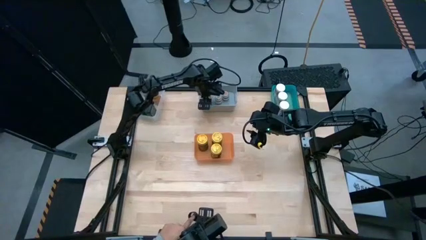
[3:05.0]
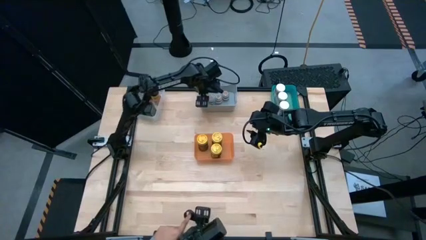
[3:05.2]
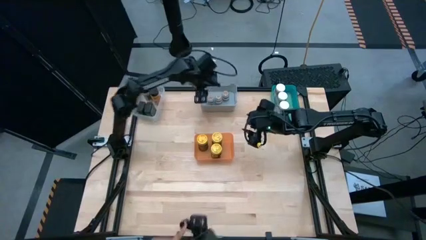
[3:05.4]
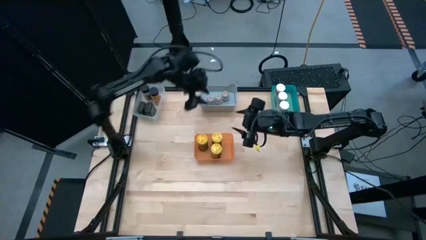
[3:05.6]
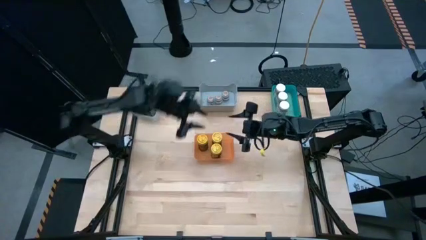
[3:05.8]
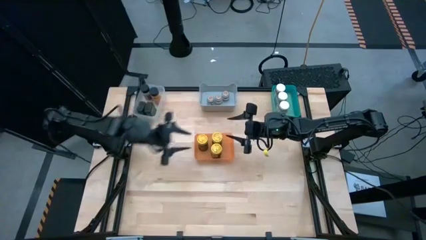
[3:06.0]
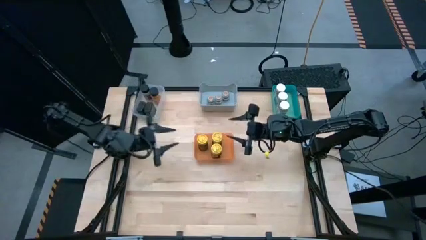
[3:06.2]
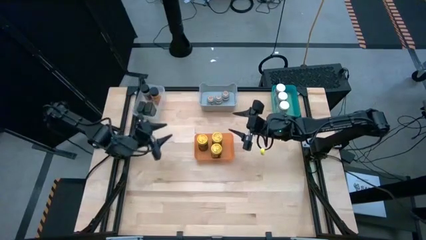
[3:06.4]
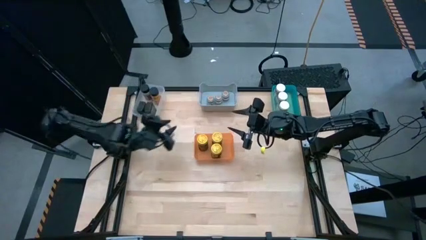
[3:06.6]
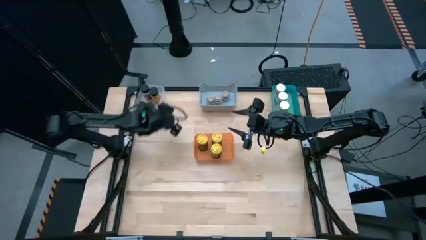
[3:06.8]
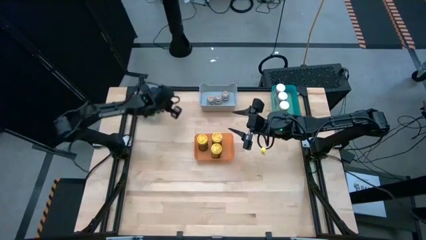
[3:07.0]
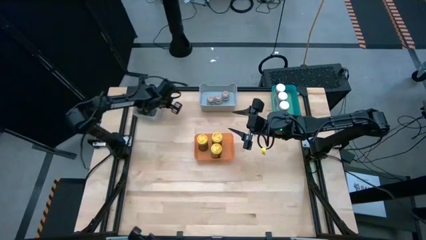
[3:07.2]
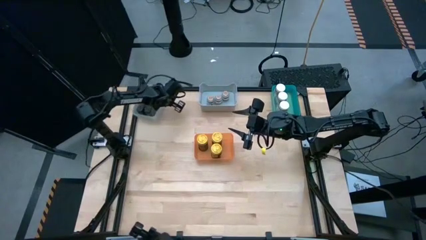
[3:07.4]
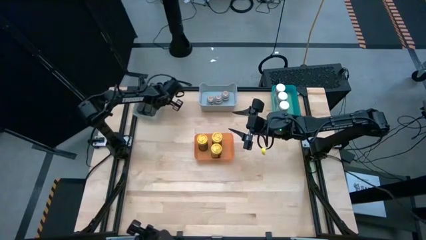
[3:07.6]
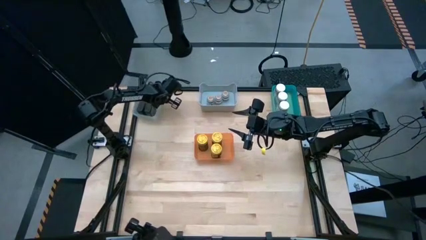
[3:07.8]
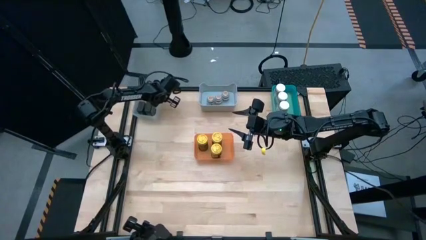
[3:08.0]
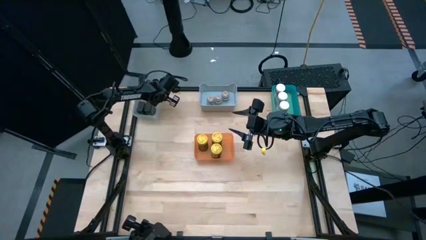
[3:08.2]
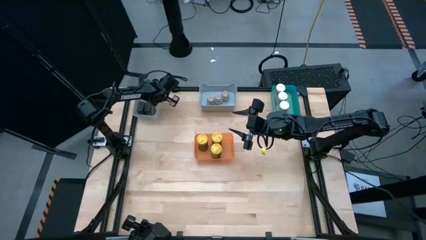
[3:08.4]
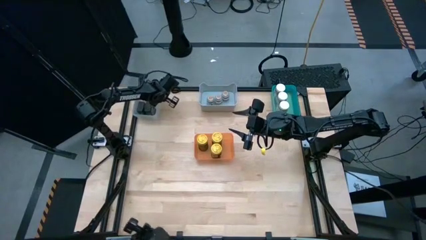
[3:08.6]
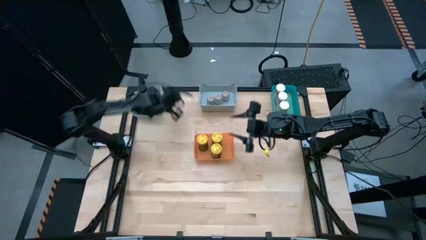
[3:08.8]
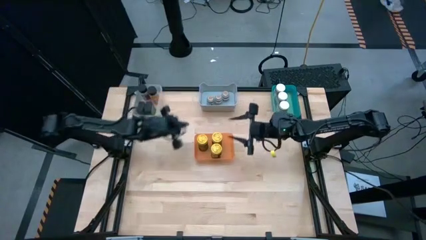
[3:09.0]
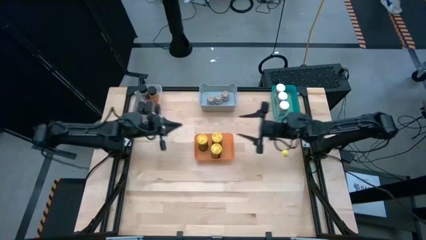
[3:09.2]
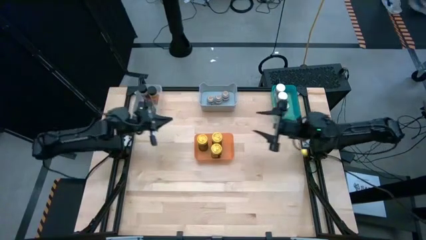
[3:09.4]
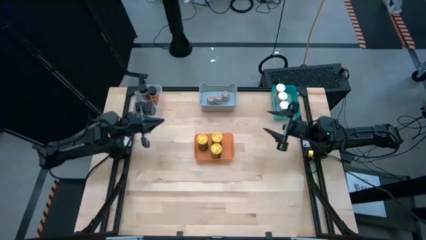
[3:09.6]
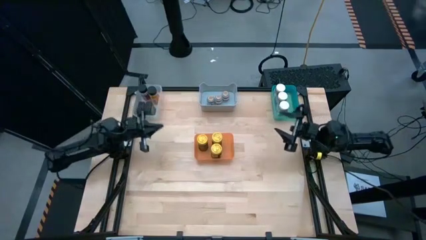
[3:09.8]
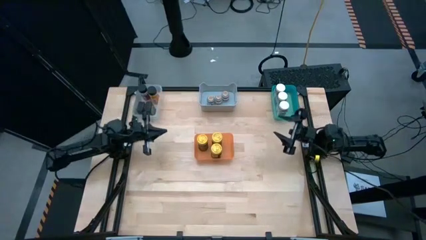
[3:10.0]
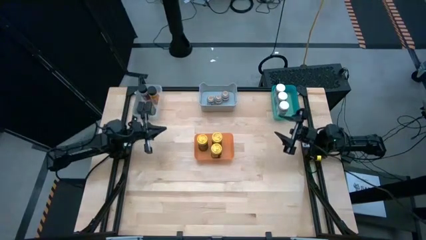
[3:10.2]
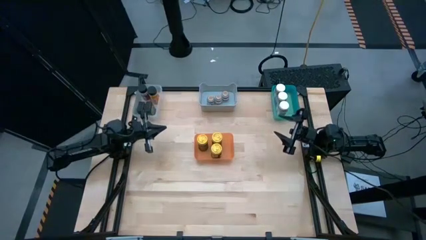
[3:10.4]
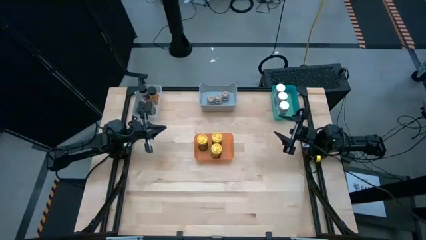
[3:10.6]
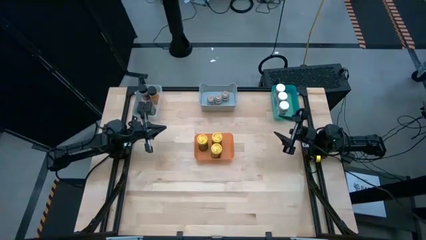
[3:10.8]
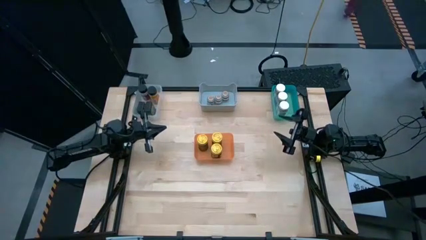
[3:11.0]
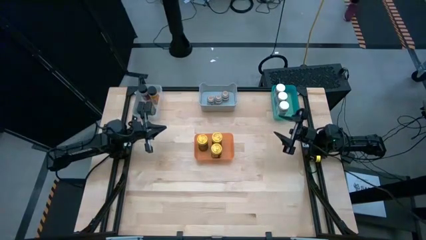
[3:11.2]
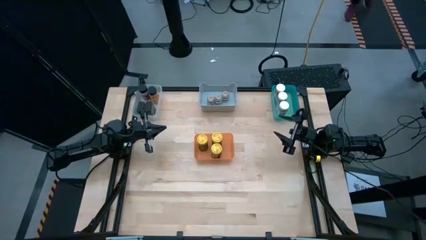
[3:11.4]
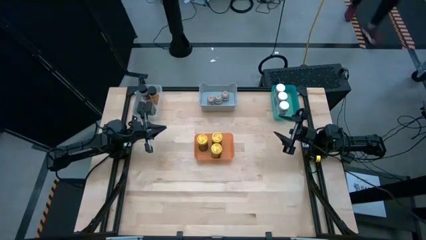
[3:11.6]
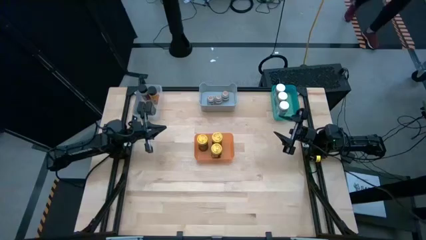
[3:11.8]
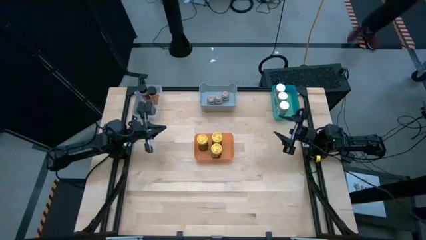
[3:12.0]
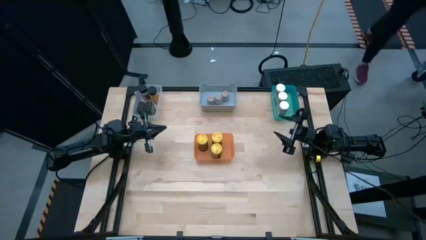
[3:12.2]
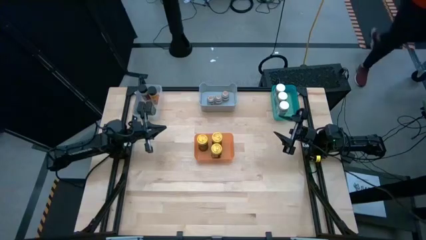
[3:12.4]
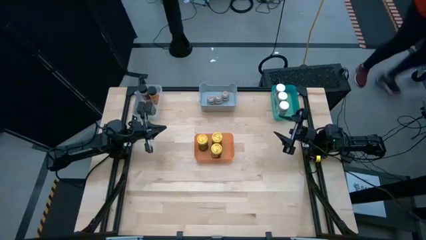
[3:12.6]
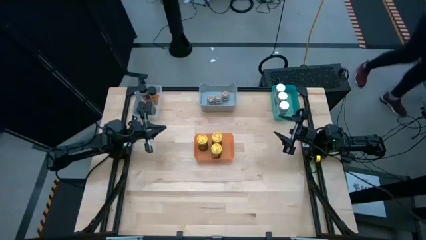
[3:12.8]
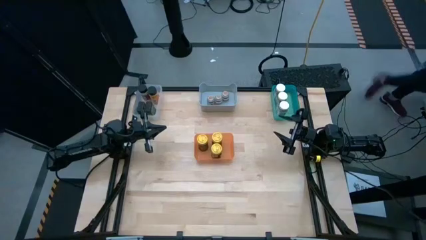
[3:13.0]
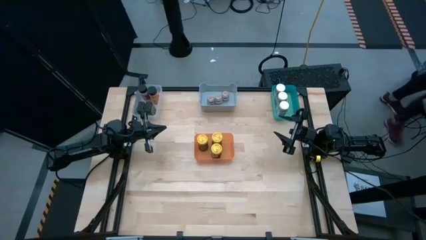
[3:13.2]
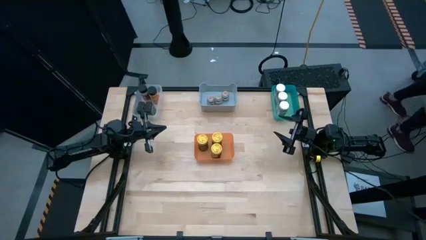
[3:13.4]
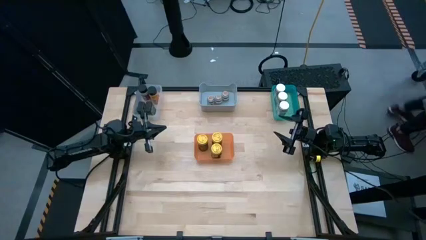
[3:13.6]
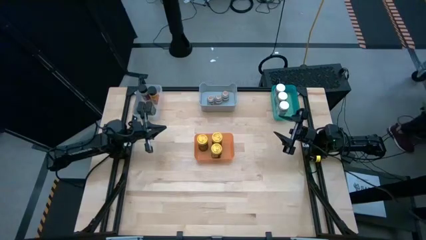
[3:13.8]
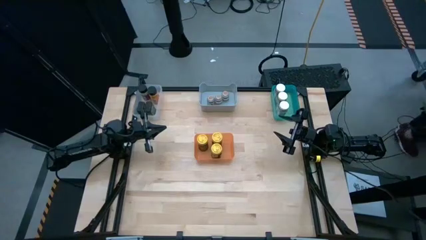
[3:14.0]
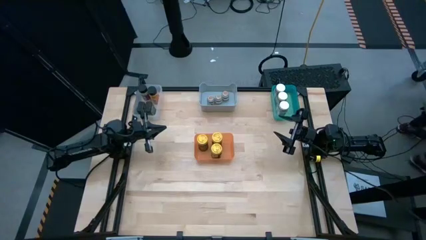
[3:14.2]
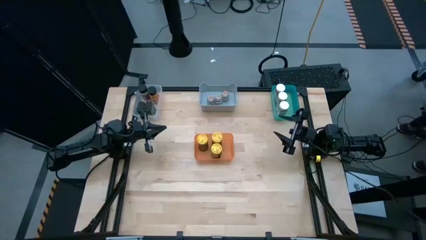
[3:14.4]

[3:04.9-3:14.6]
Task: Sort spices by type
Return to Home Position

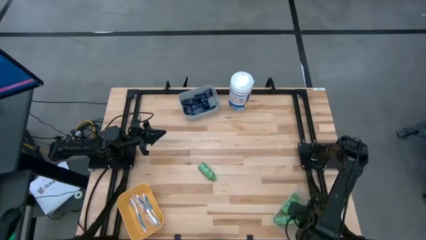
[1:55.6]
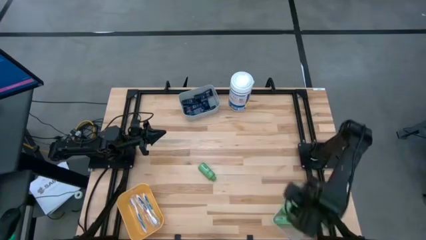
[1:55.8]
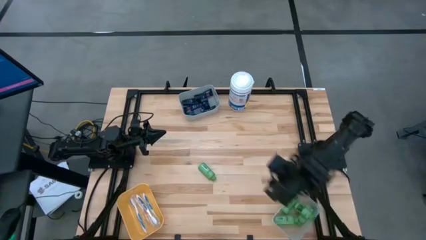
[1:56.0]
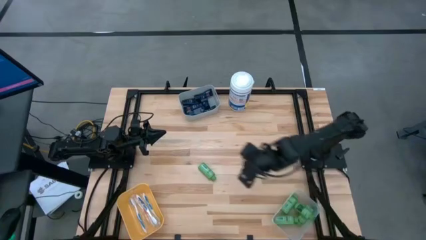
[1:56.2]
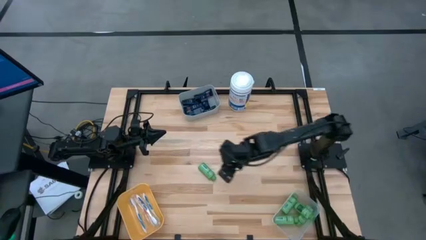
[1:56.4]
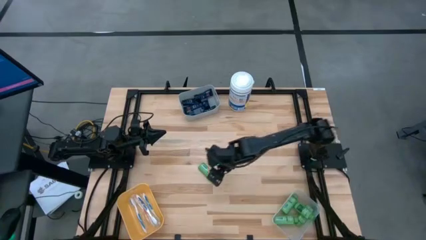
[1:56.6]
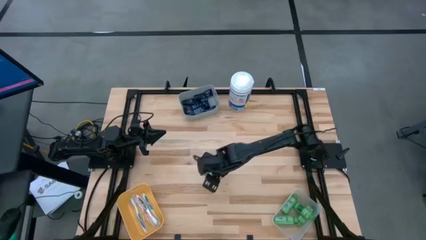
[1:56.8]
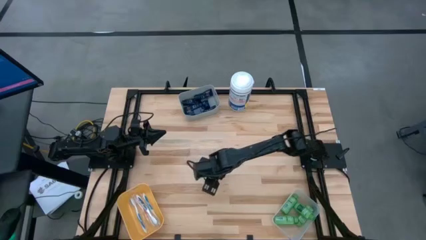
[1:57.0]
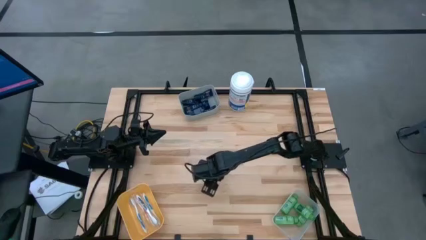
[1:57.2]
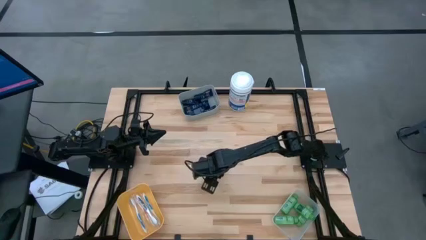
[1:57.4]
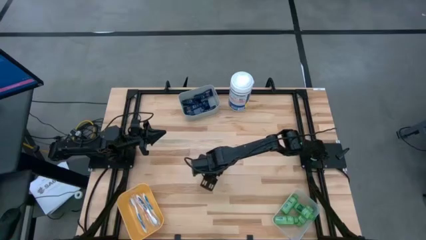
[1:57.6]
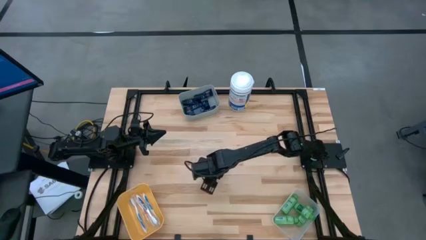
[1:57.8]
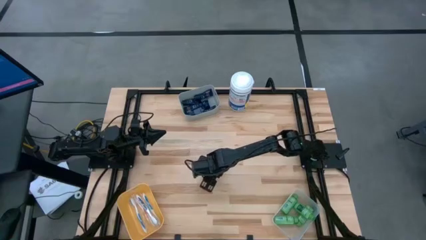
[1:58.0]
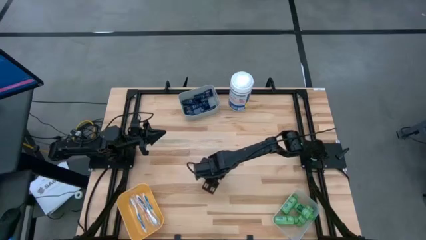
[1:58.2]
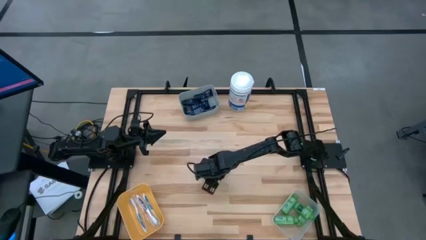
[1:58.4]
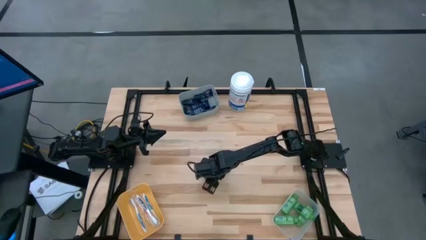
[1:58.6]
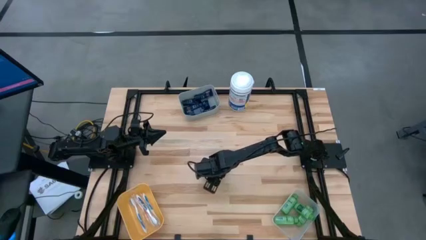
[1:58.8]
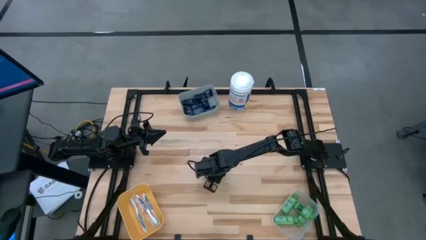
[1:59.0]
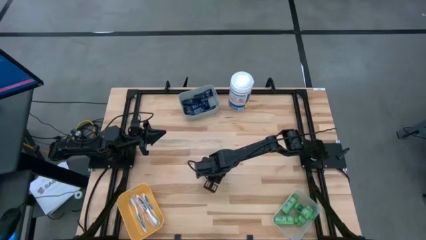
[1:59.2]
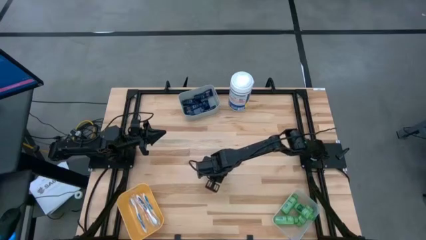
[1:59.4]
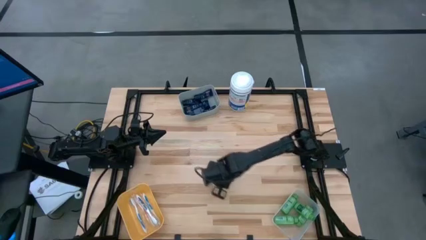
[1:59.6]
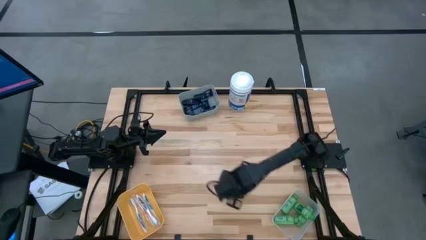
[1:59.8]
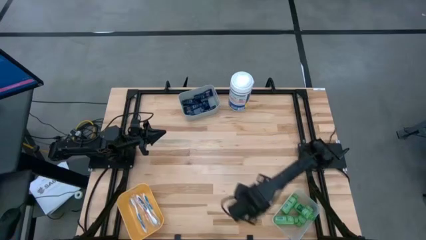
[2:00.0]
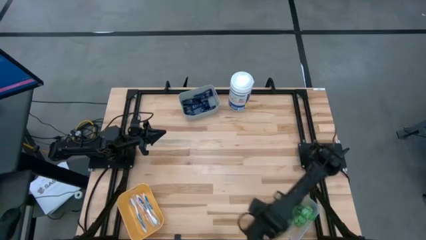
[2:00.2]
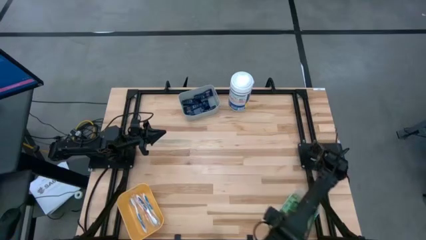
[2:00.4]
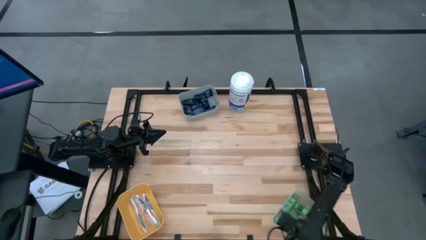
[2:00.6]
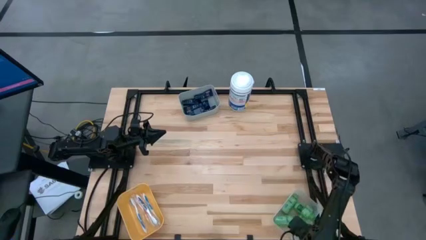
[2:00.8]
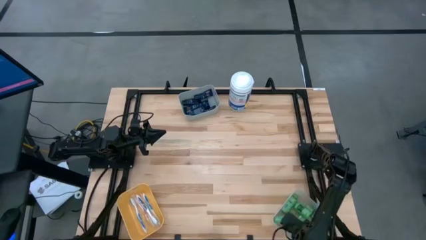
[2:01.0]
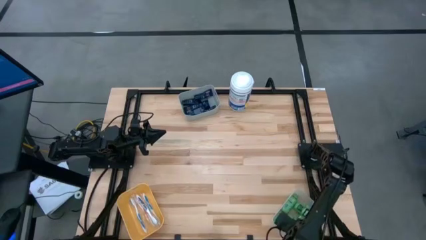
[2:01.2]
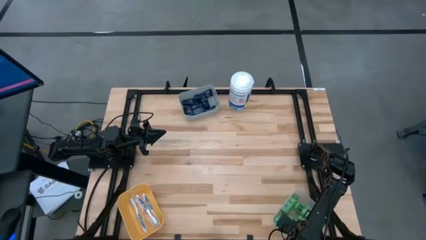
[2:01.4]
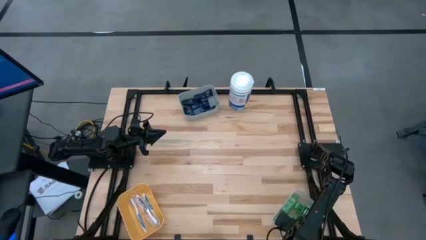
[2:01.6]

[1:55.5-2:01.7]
Task: Pick & Place Travel size toiletries
Put the green shampoo into the transparent bin
